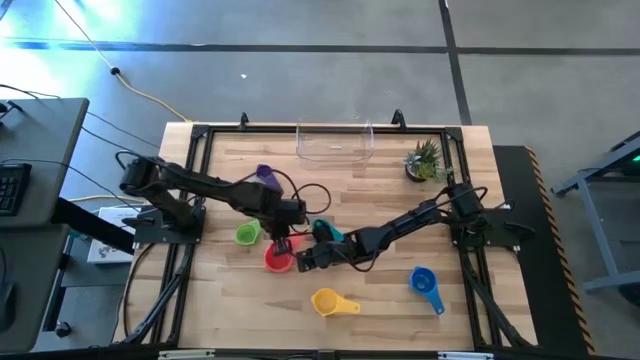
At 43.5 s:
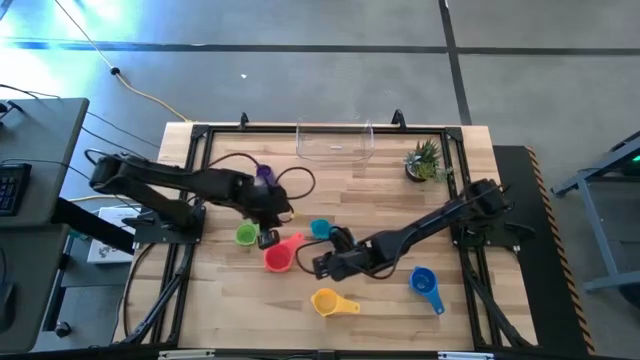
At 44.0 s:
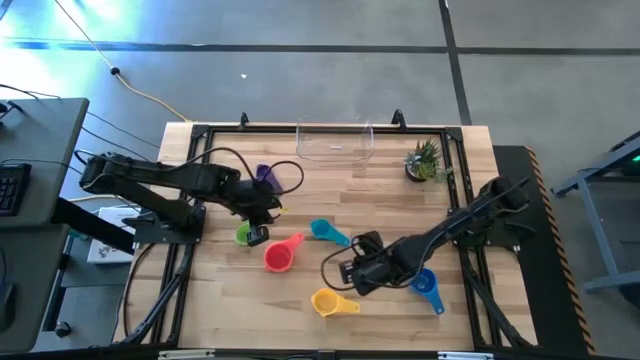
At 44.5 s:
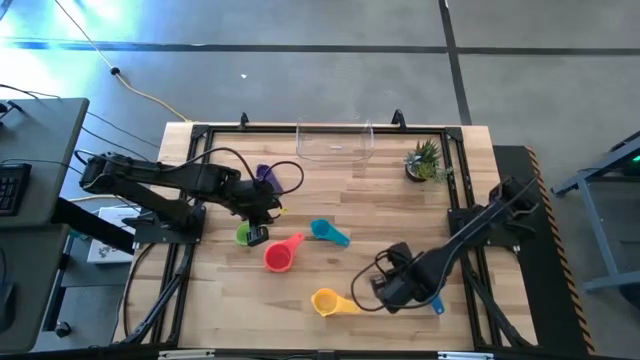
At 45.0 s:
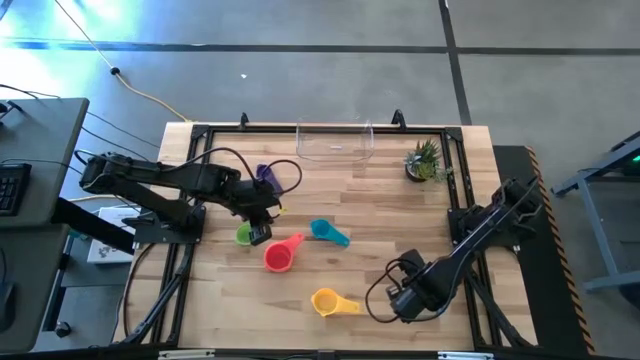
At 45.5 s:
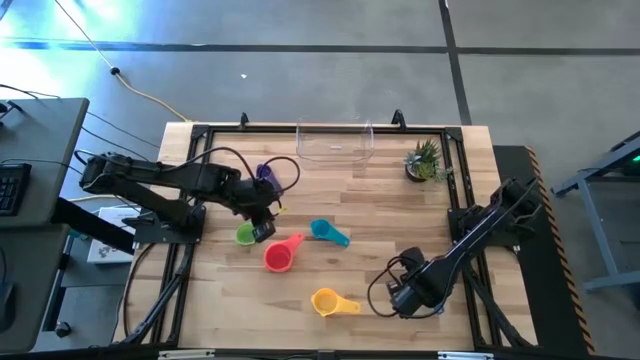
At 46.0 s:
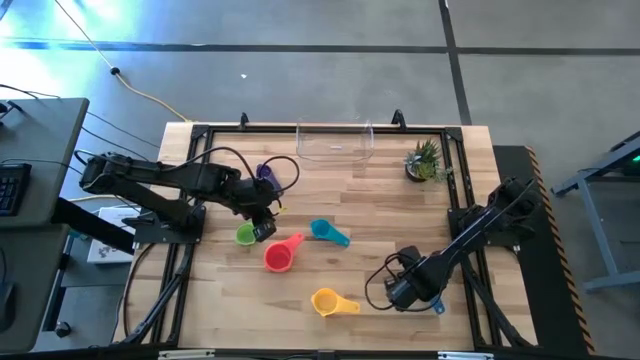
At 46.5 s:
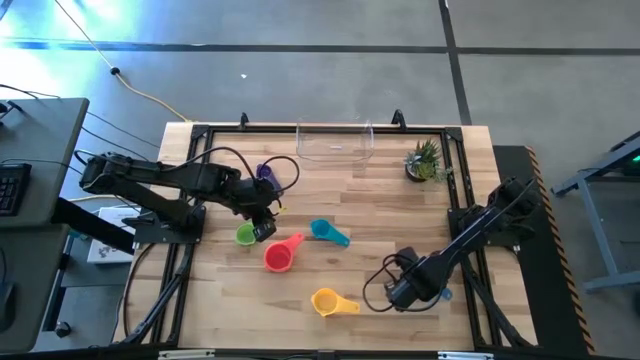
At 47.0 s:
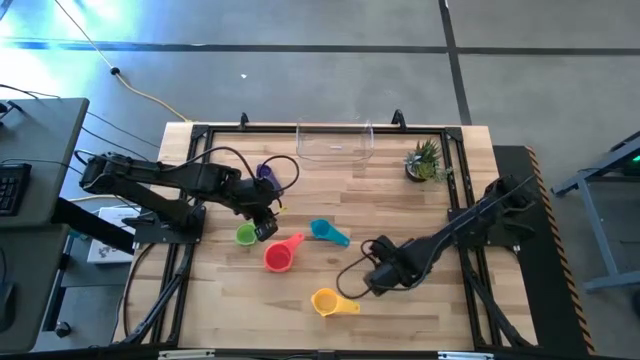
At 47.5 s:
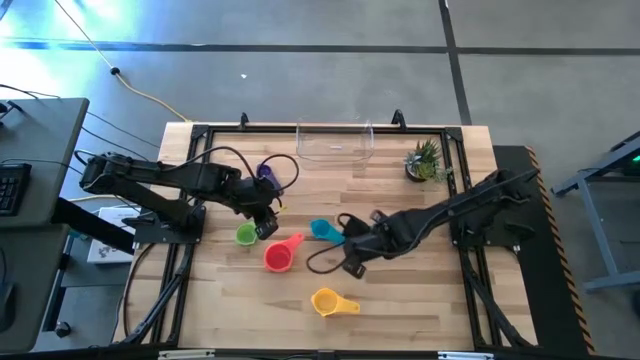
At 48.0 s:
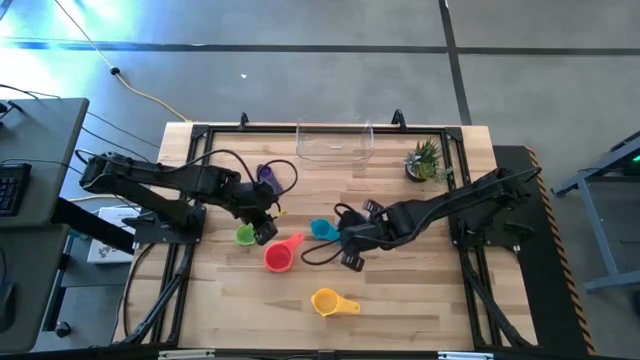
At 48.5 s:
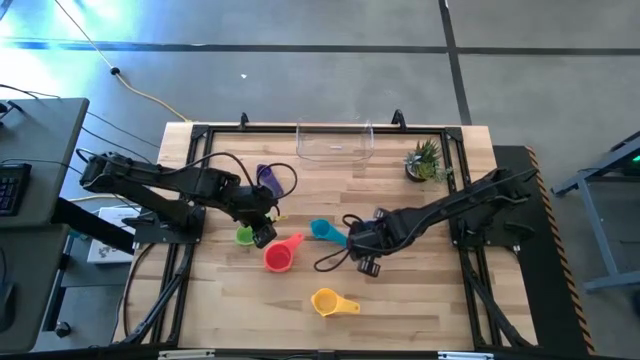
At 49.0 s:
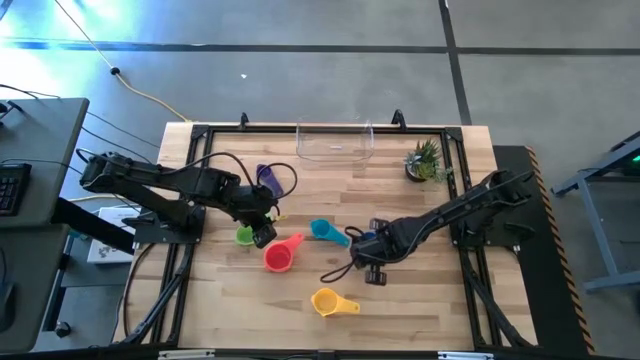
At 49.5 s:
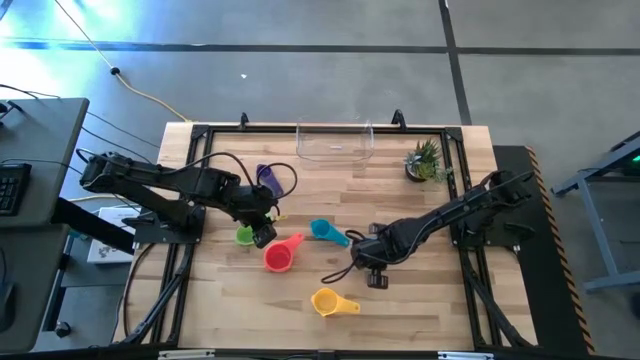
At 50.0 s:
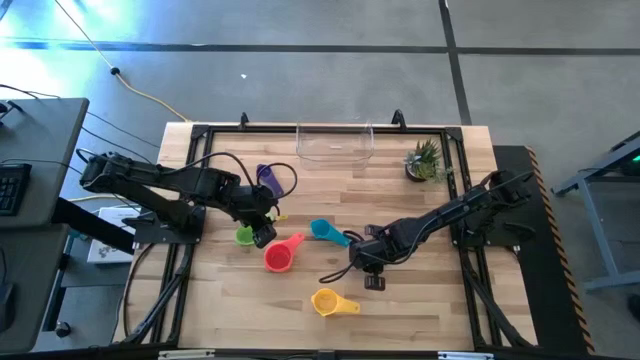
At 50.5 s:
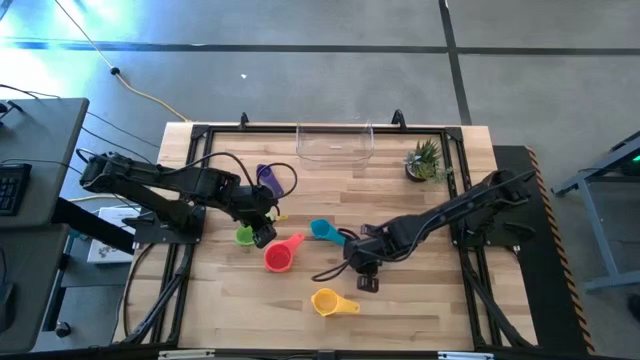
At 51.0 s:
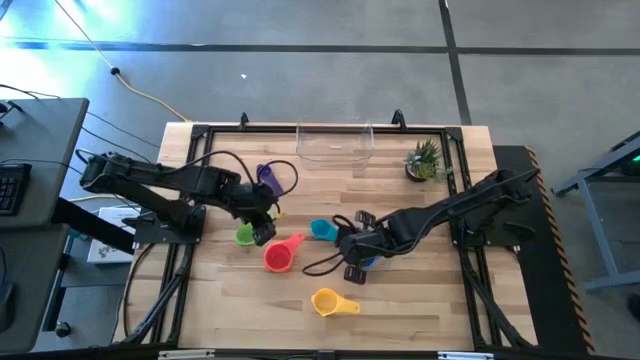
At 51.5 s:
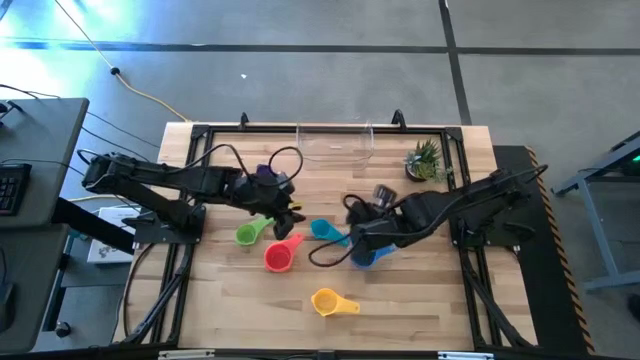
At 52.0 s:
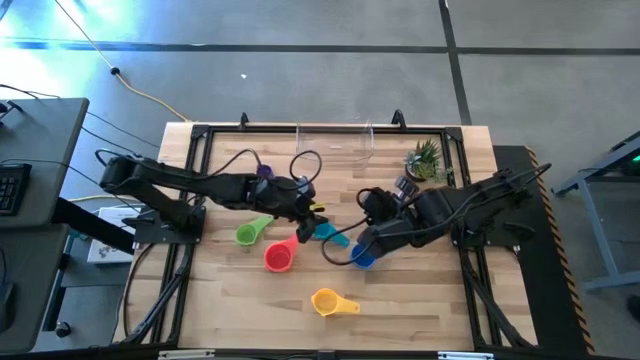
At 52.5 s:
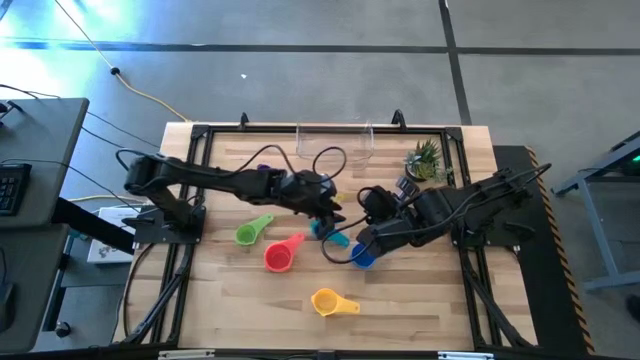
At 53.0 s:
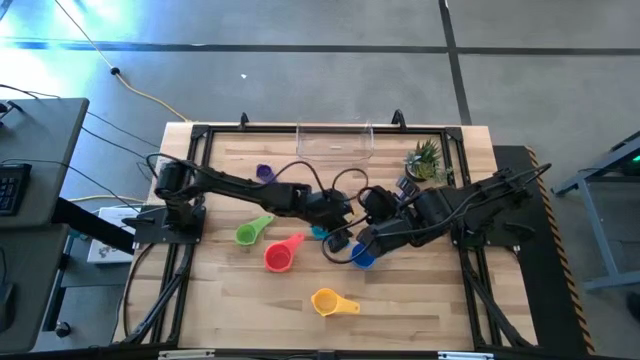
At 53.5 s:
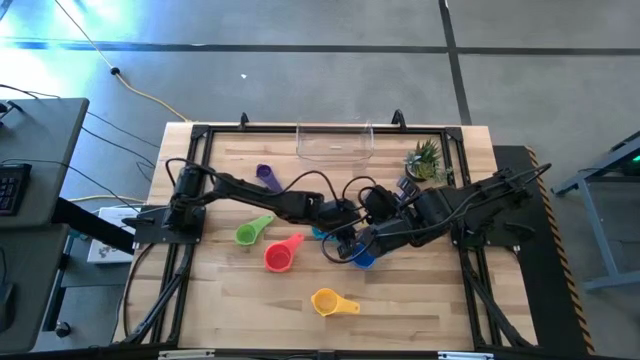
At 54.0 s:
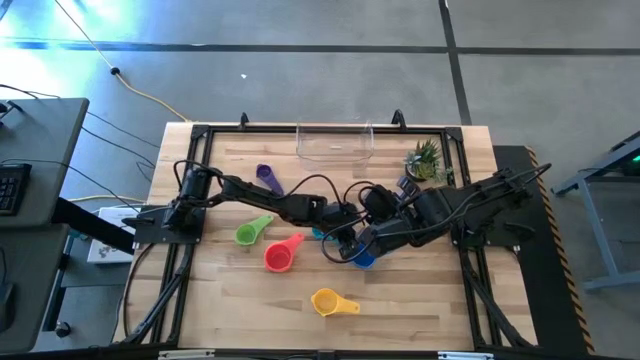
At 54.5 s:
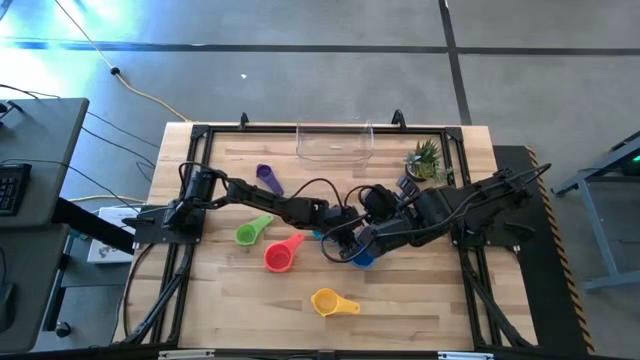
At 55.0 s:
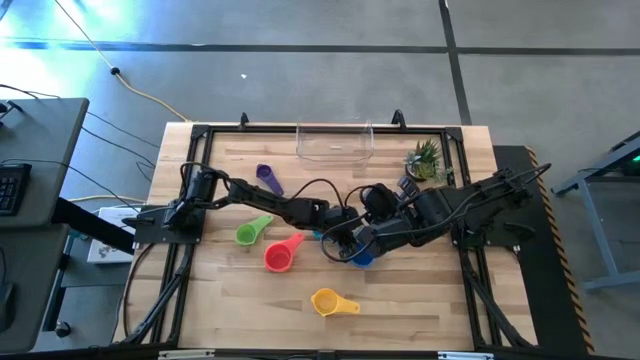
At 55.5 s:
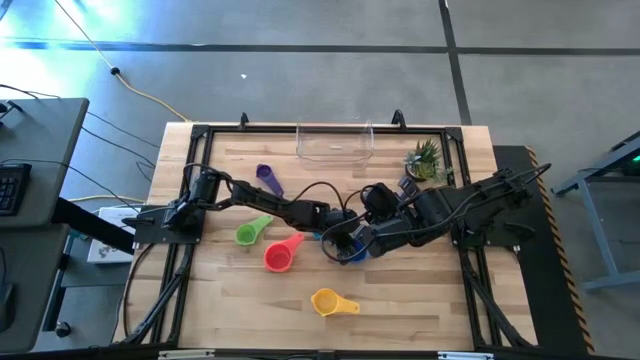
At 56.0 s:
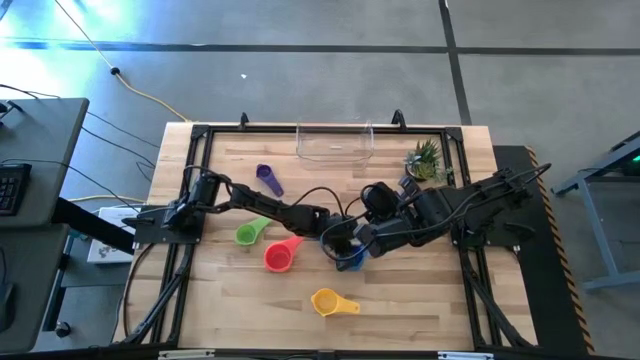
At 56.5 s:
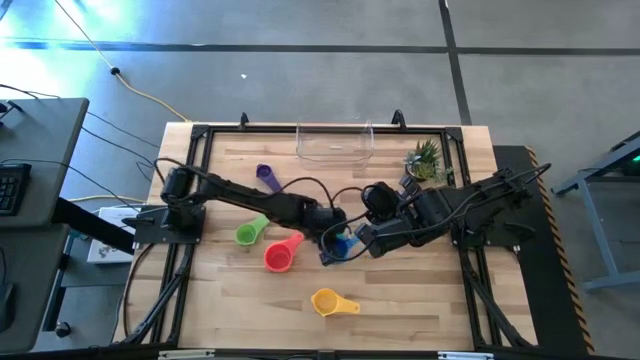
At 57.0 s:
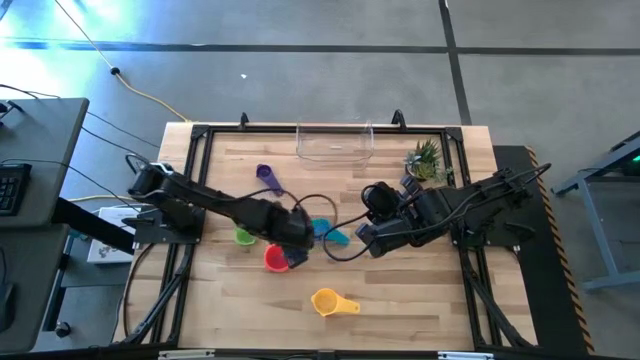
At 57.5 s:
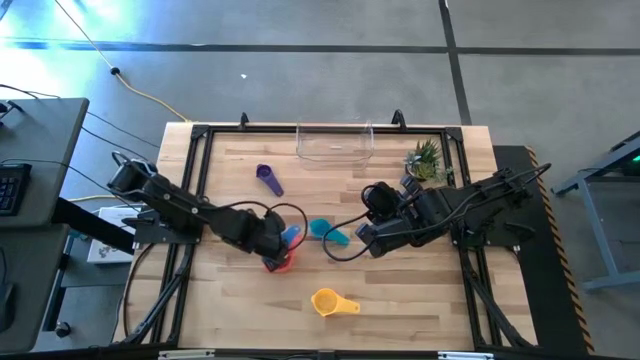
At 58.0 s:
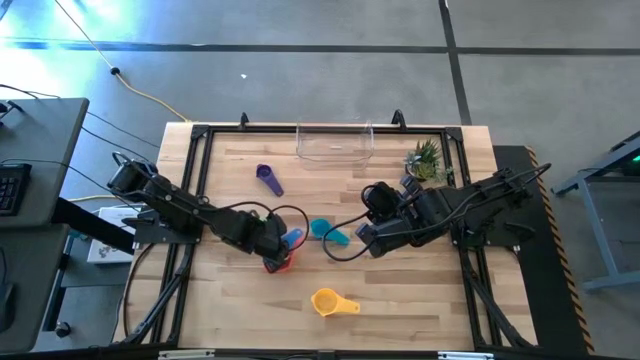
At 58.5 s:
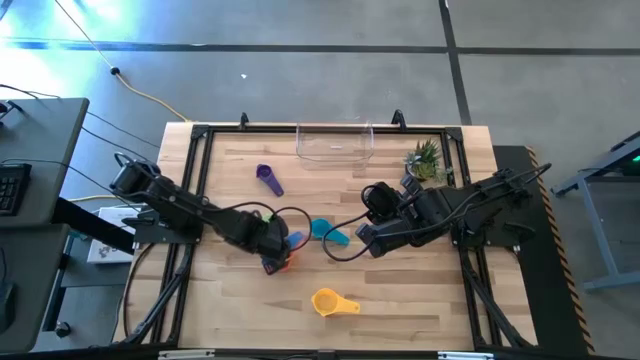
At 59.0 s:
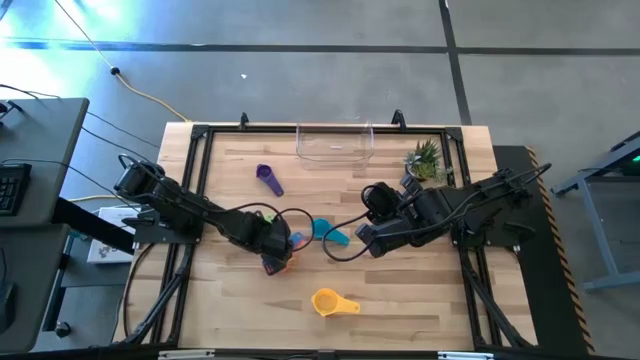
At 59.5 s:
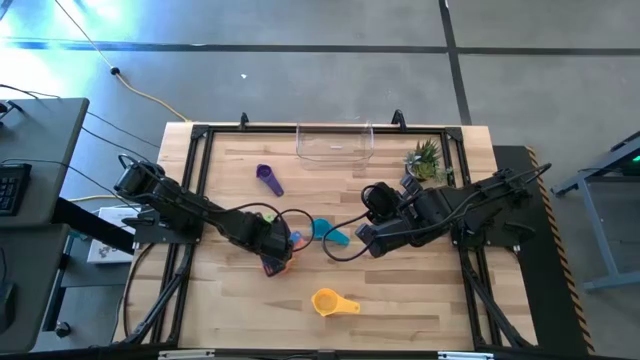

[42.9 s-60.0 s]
Task: Nest measuring cups in basket
Stack the blue measuring cup on top of the red measuring cup

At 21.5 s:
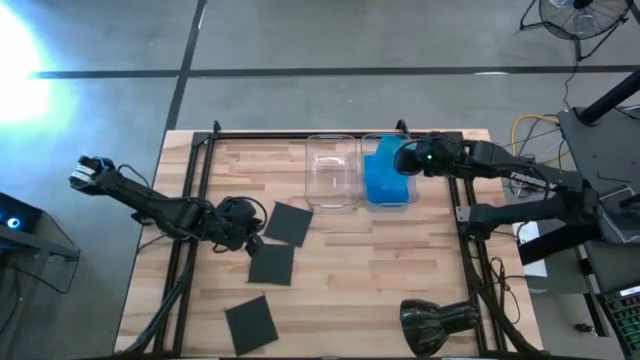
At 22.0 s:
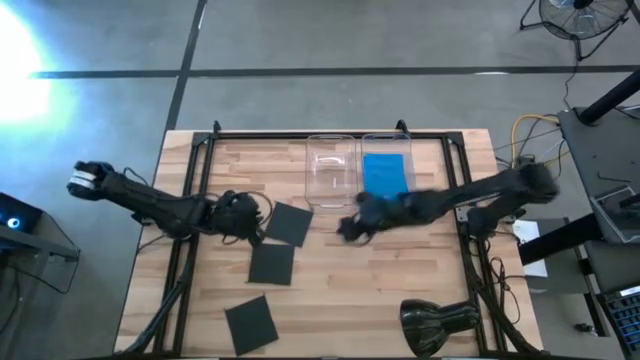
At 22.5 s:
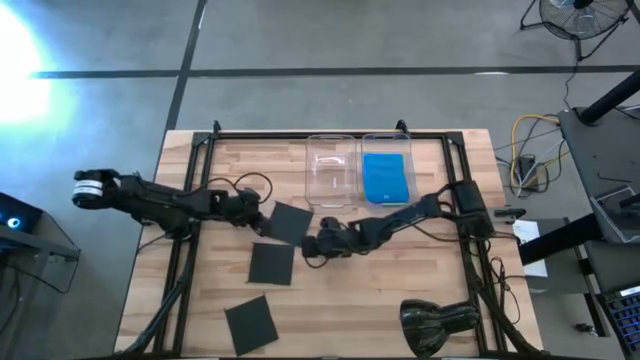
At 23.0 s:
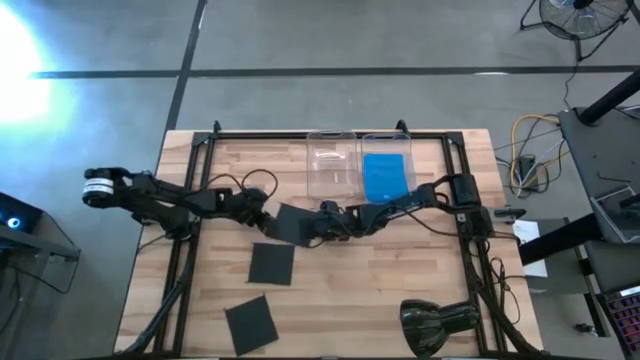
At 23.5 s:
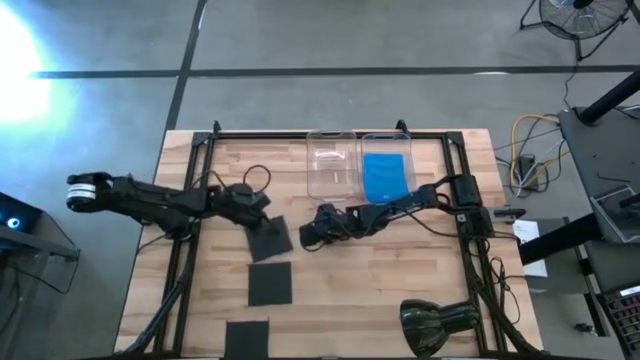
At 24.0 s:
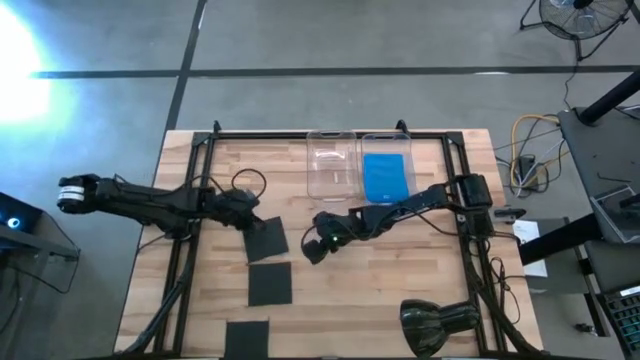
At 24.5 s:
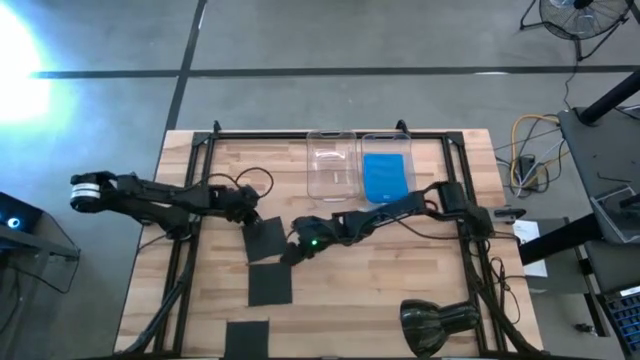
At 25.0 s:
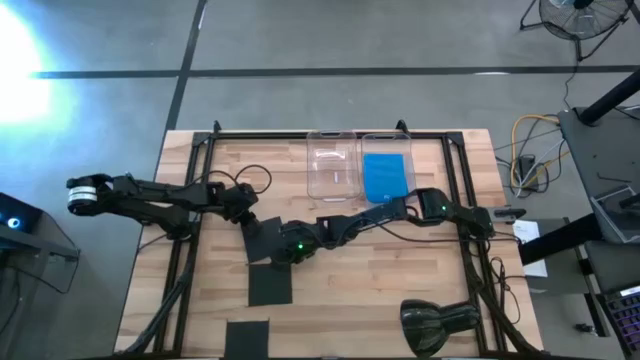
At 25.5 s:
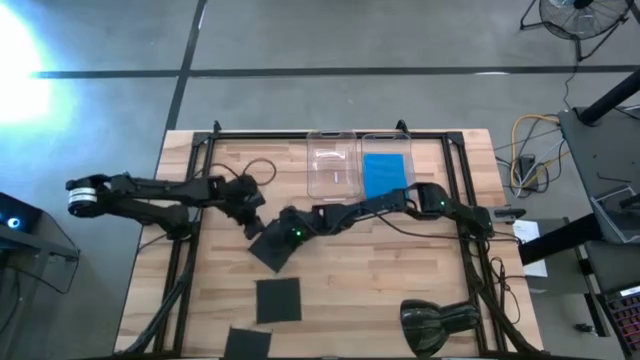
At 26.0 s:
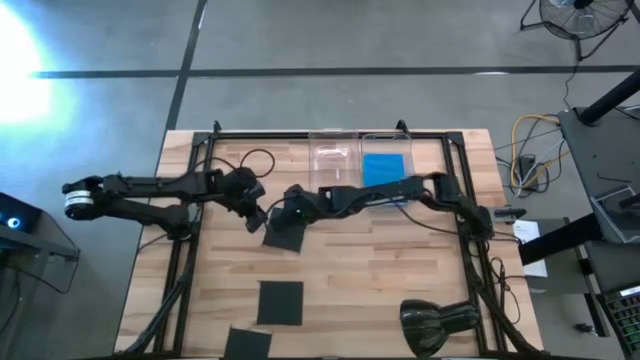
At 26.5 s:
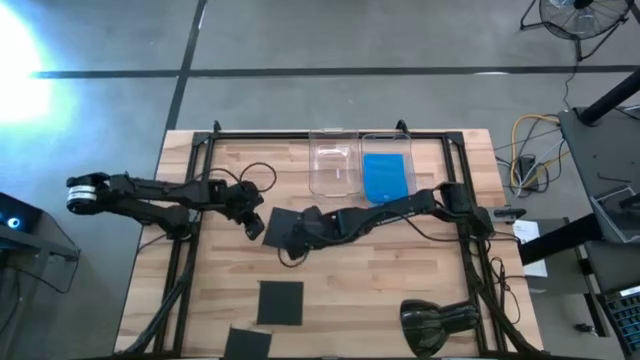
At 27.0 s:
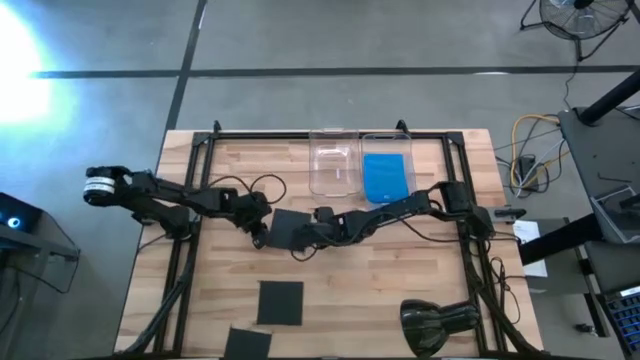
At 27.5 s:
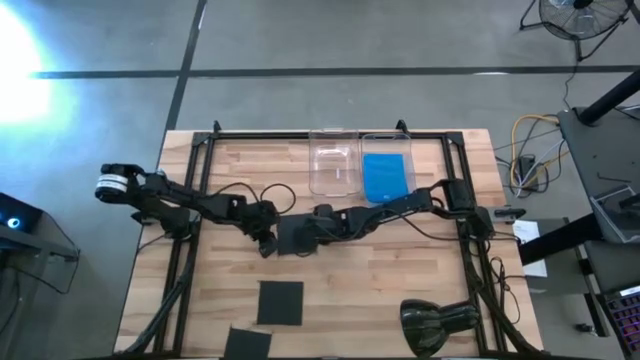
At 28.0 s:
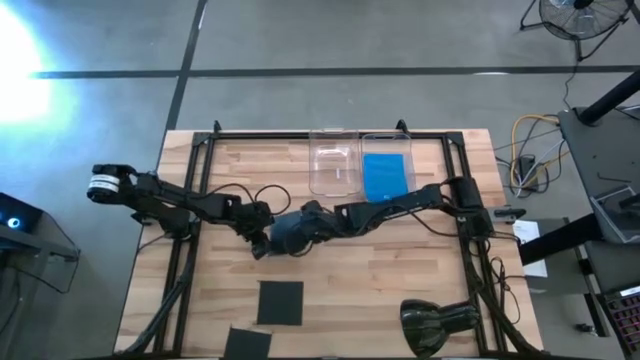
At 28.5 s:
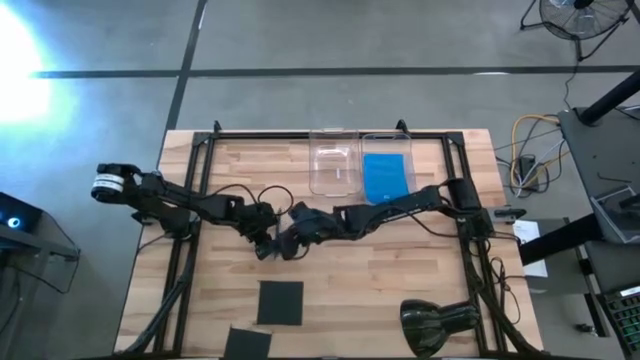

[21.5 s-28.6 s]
Task: Pick & place jewel cases by type
Put the top black CD case into the left transparent bin
